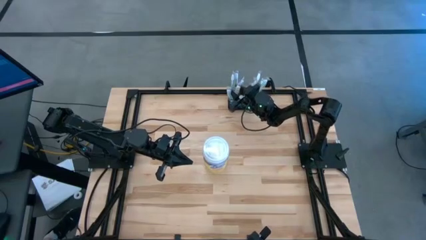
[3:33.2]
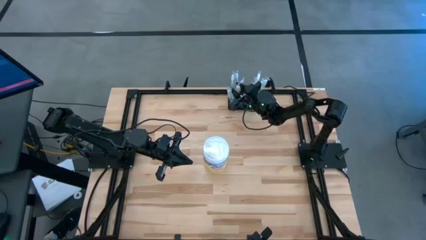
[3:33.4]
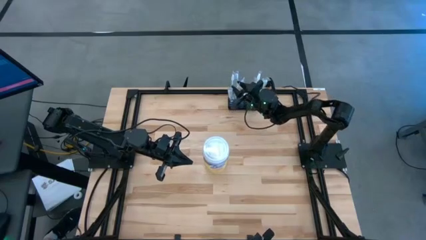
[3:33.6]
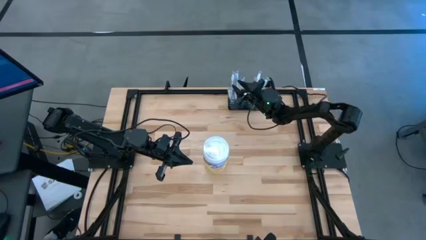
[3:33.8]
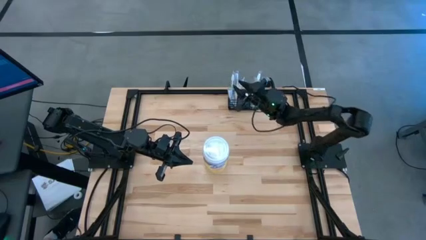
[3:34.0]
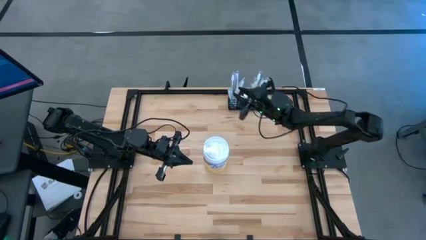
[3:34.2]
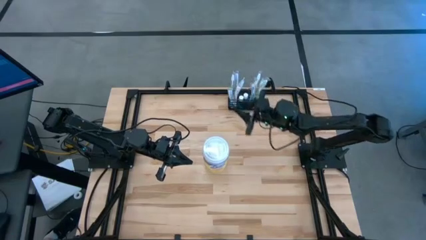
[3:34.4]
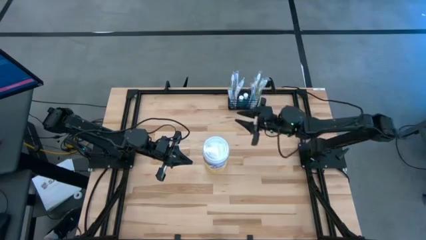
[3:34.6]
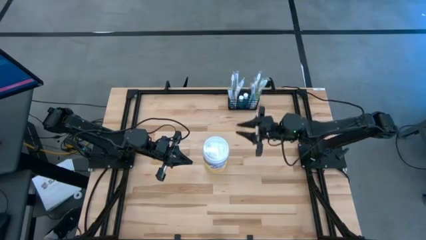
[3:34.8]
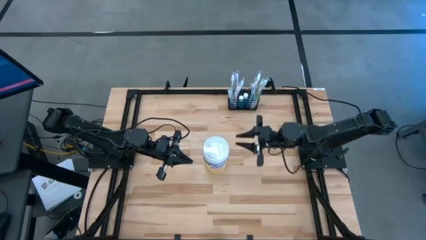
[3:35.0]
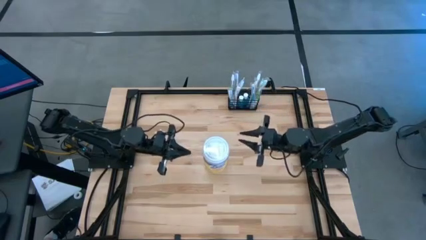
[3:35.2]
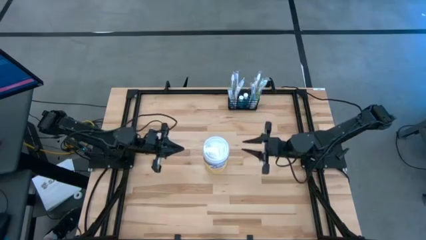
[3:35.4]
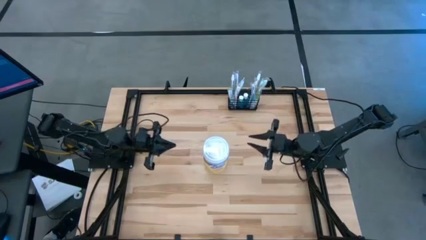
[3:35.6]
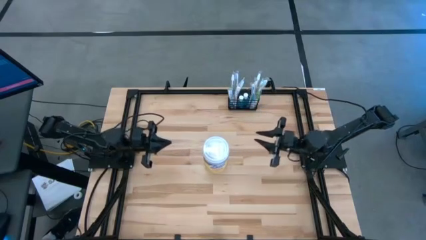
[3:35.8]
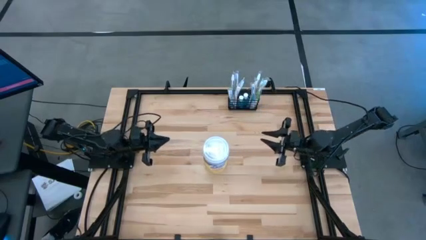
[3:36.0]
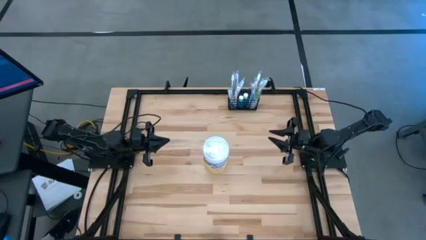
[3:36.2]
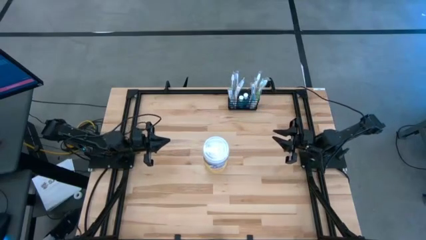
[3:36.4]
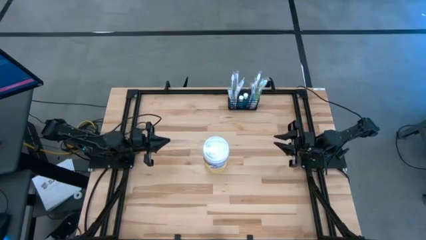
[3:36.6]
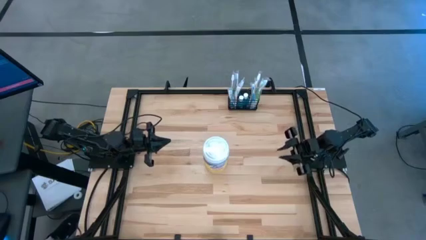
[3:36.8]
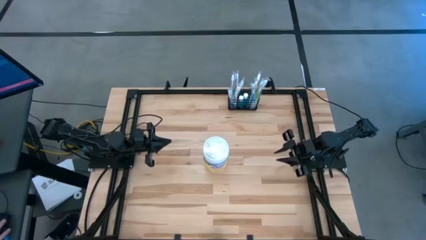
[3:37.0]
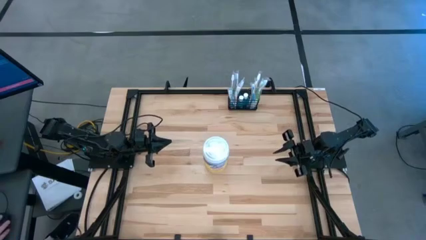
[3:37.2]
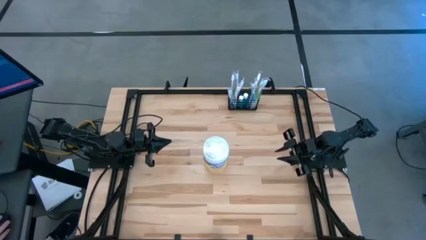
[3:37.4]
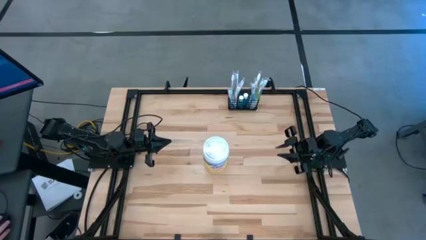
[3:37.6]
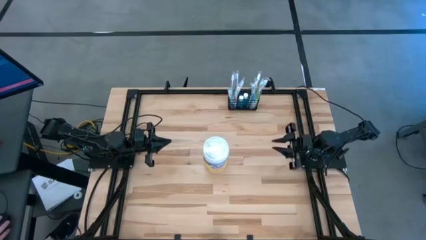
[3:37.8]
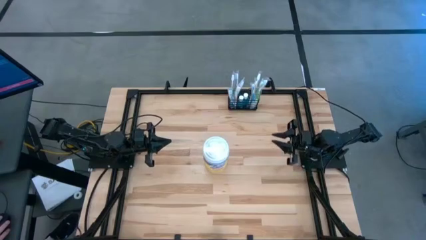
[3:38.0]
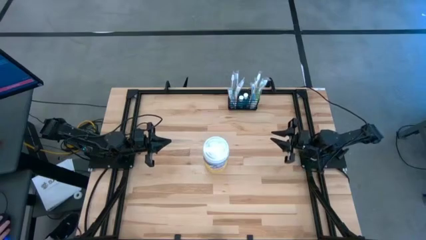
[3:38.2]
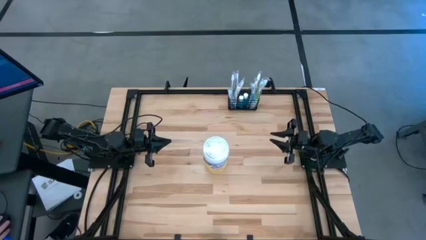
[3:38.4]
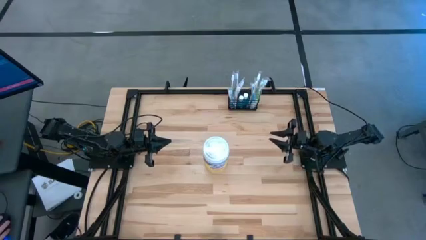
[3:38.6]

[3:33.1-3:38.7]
Task: Pick & Place toothbrushing station
Return to Home Position

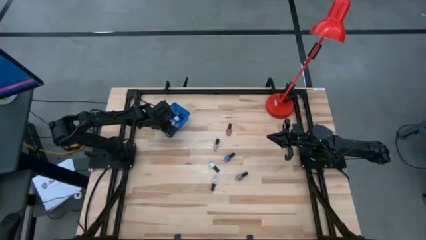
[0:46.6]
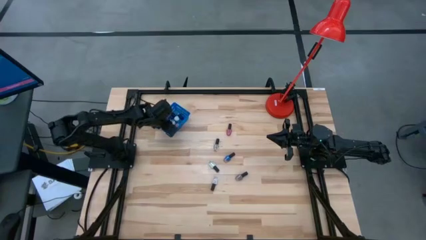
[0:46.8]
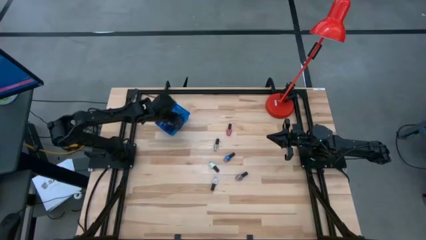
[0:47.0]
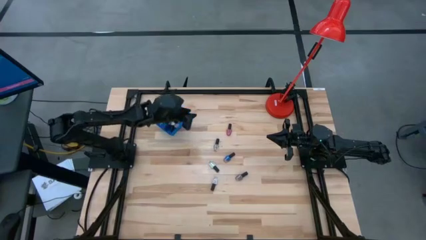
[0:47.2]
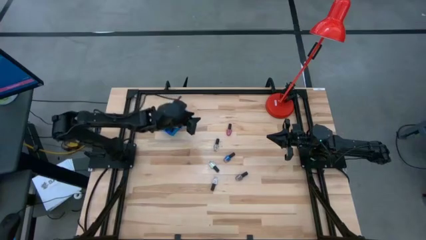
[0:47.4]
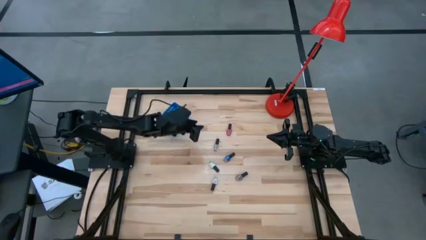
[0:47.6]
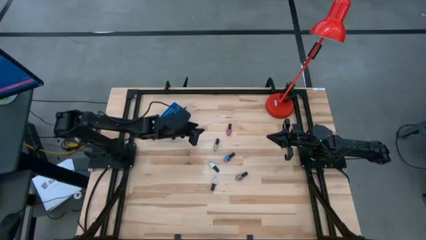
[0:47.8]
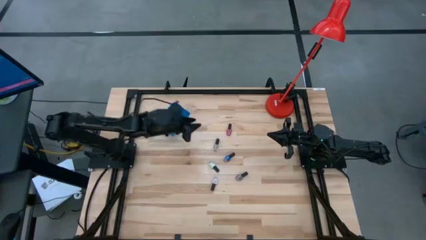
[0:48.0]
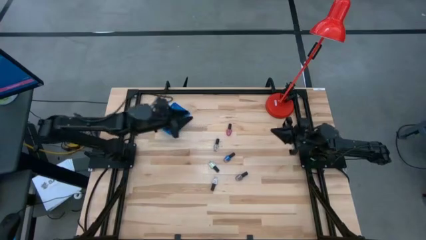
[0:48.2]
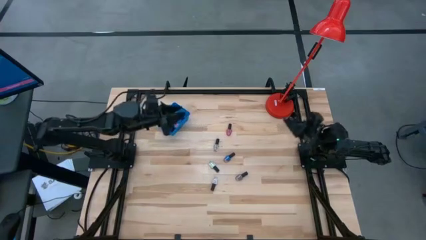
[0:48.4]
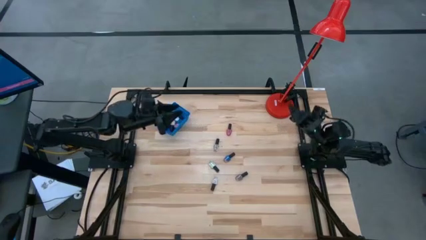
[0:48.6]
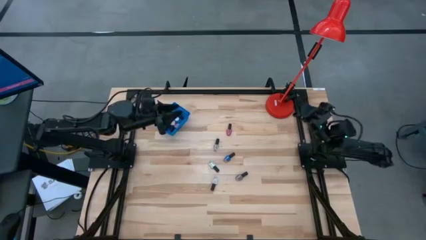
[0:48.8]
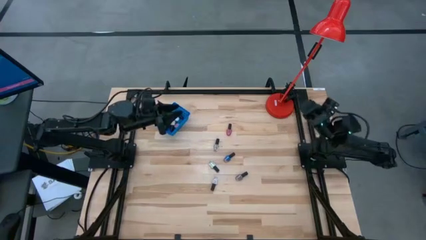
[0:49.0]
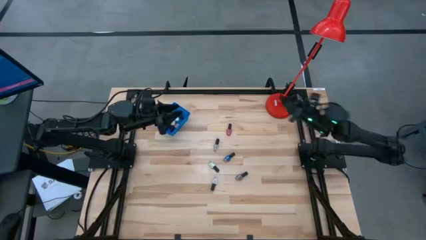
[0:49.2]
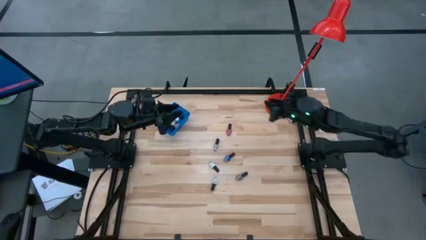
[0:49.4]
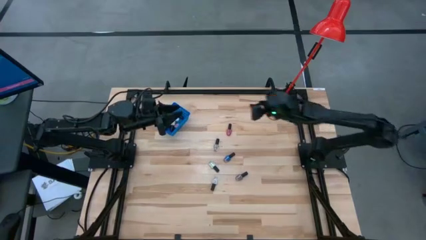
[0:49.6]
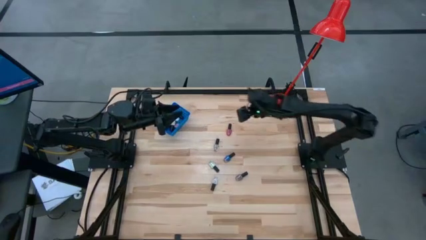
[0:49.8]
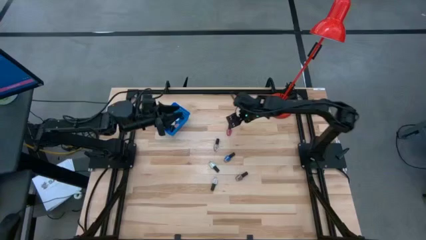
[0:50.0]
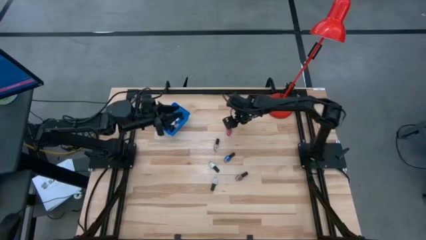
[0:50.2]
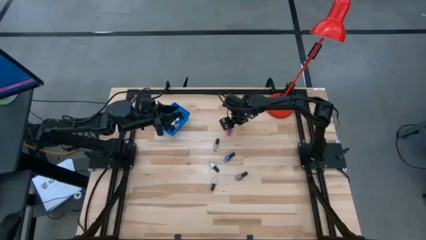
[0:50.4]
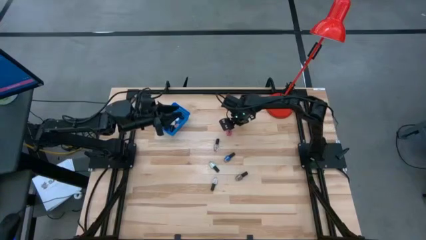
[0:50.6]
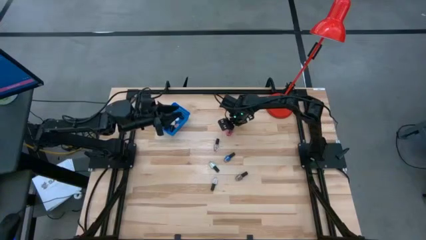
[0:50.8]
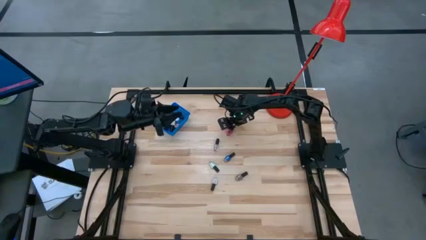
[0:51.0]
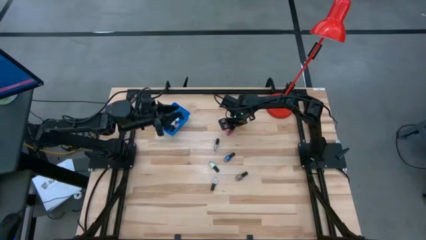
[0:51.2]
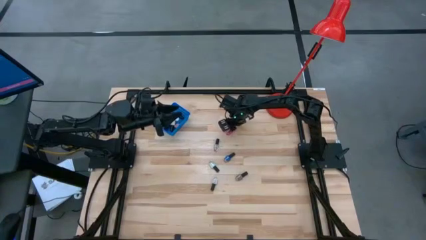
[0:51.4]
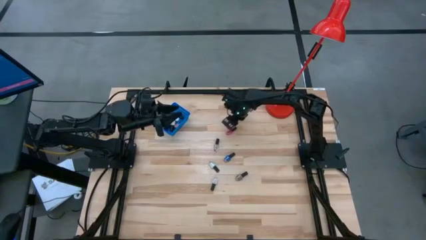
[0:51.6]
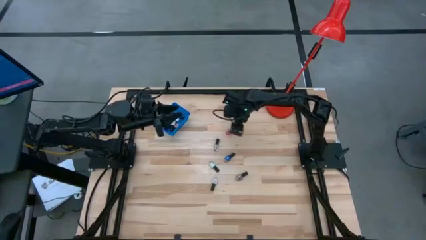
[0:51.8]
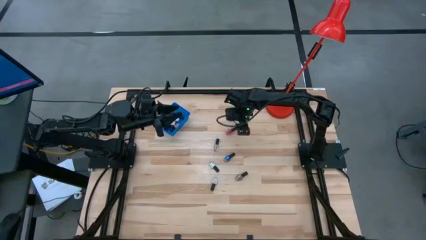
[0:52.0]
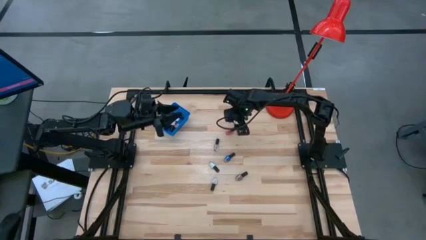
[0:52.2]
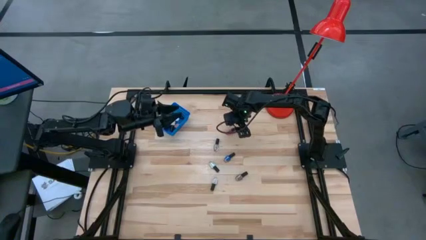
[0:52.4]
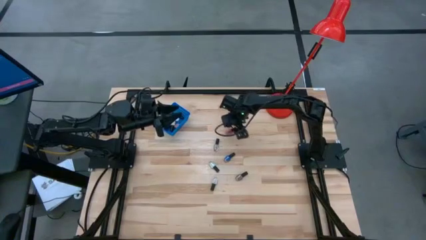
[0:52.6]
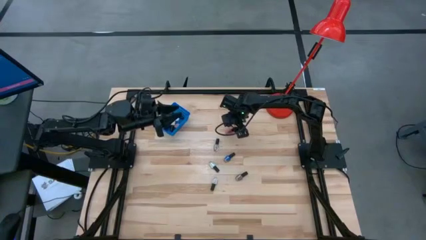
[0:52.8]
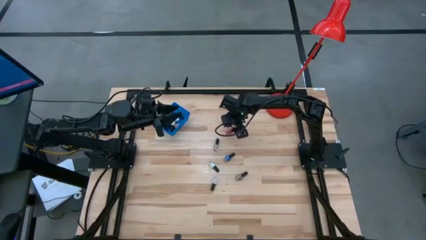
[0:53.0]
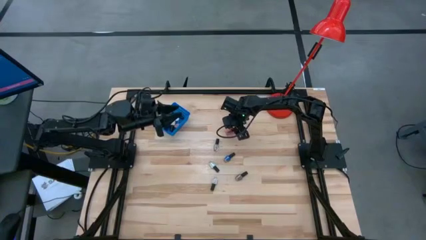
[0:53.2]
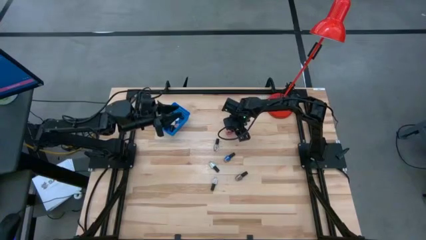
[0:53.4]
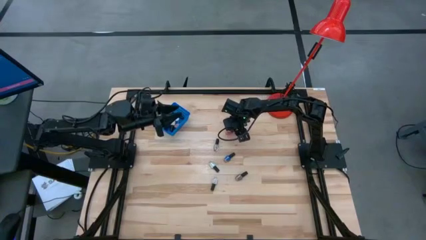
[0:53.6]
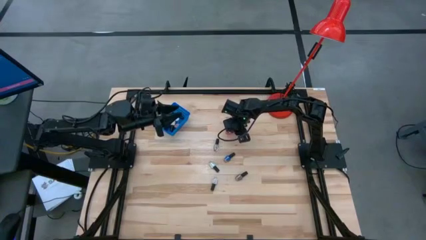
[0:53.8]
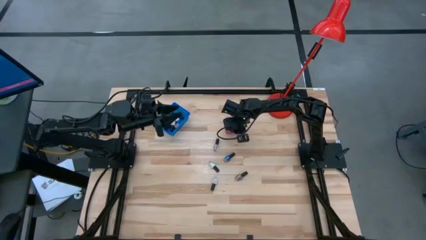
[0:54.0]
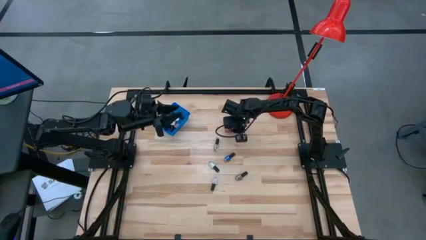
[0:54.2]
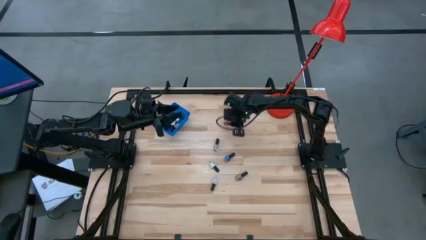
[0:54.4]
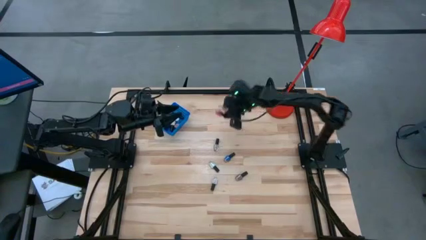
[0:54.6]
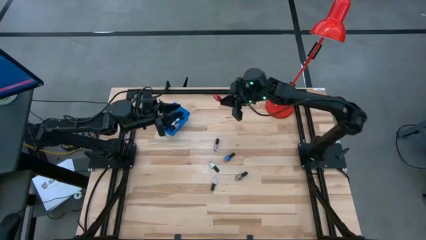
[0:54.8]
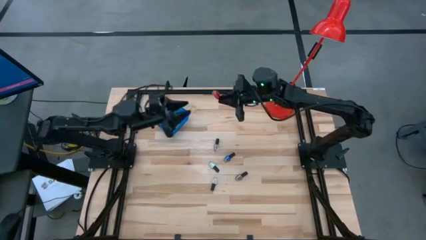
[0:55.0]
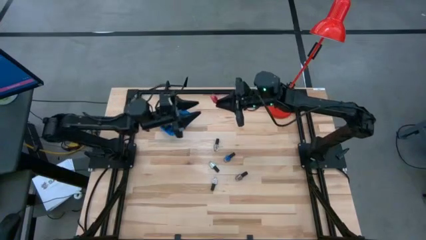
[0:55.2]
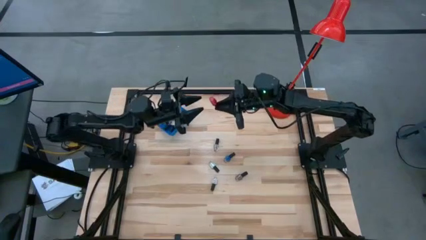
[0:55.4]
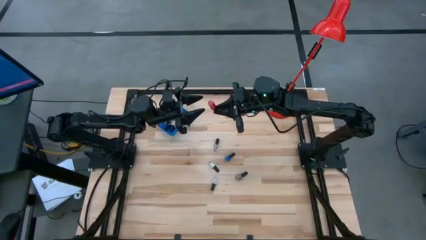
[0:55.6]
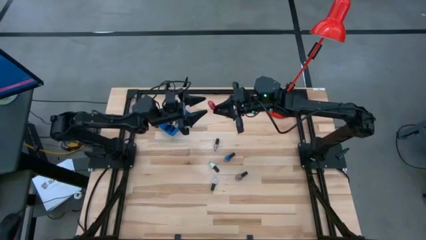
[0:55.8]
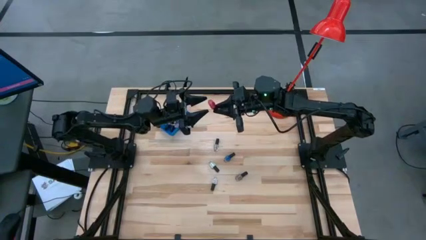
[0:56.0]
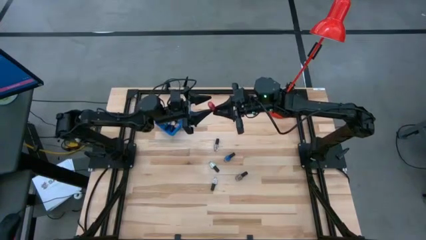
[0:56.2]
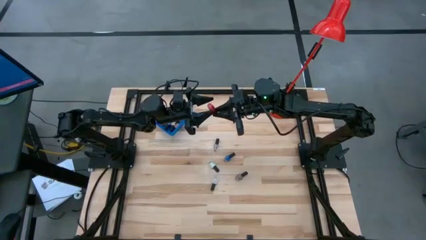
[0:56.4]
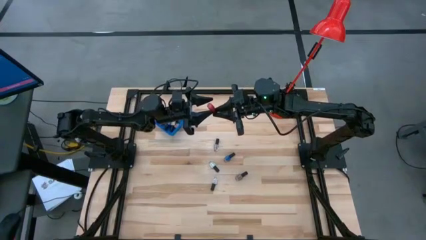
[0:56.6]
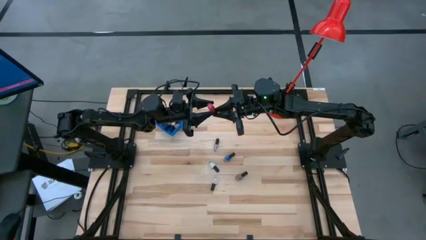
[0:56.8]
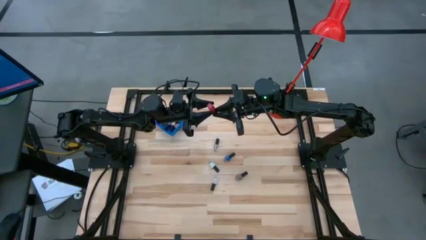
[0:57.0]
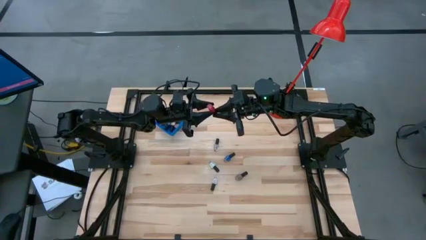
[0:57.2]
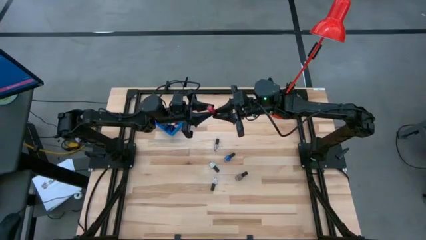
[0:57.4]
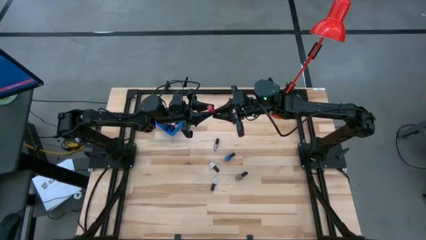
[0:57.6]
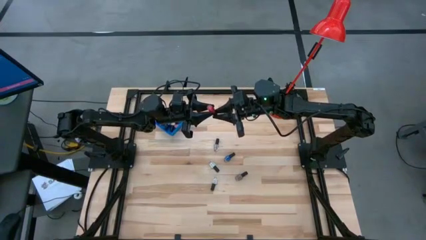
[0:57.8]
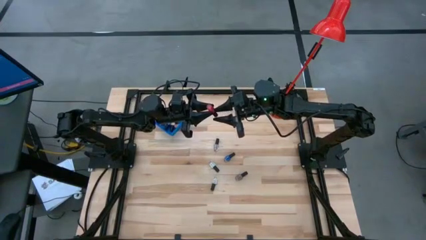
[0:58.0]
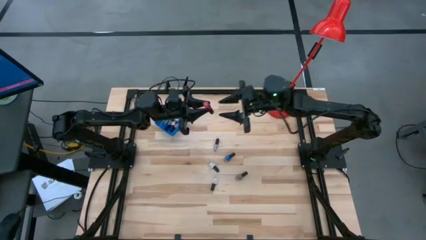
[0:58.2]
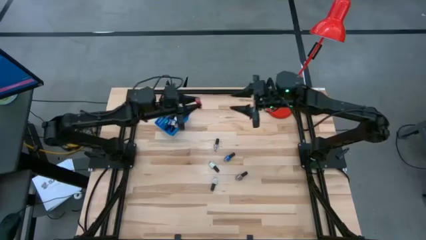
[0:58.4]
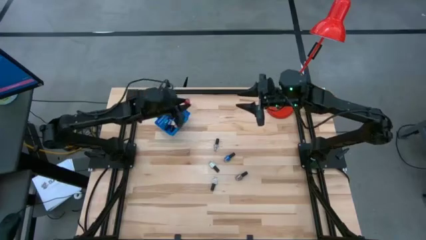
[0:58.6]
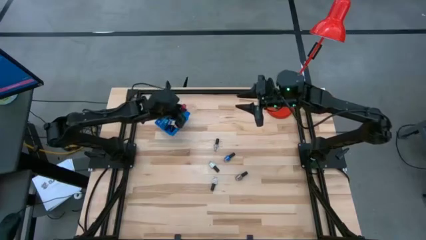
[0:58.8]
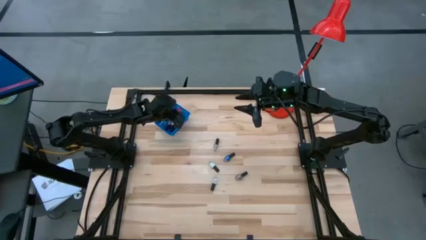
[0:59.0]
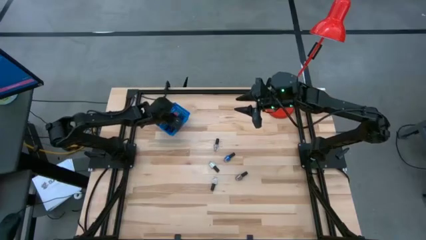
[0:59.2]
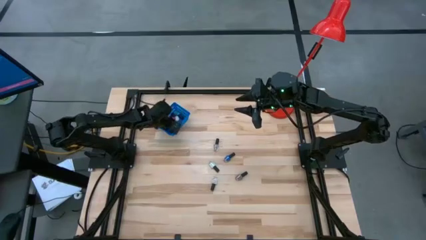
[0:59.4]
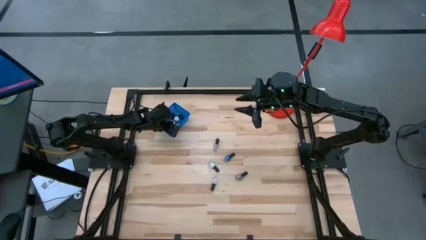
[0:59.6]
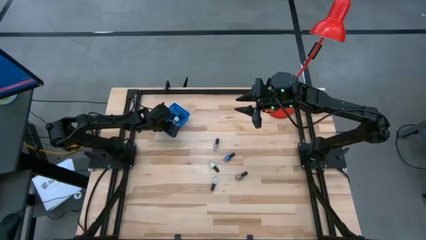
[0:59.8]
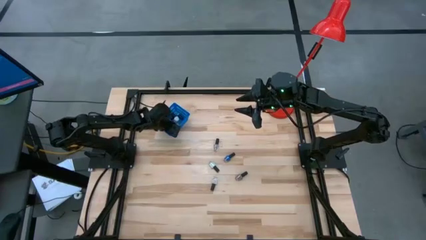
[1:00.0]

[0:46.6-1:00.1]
Task: Pick & Place Nail Polish
Put the red nail polish bottle into the blue bin
